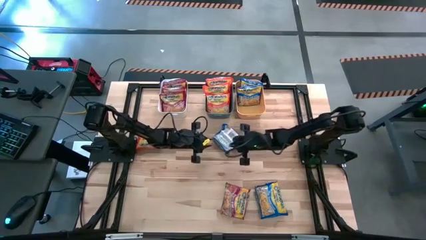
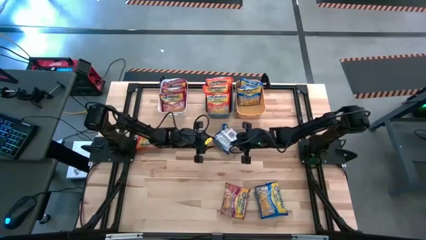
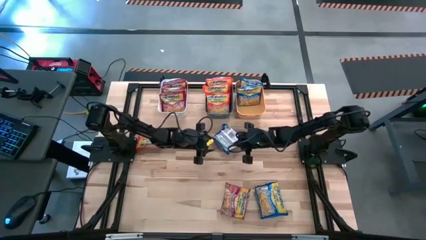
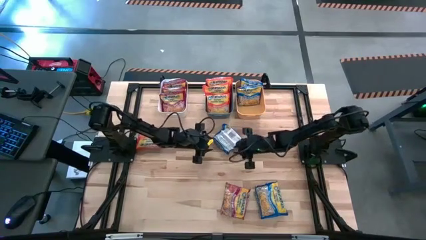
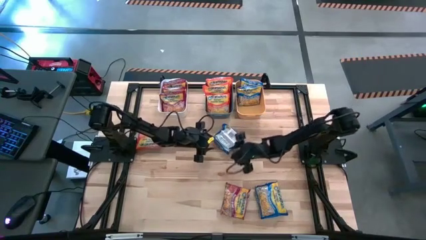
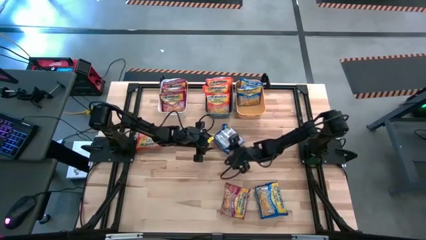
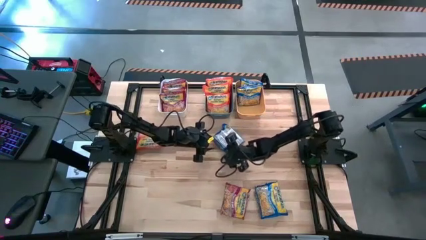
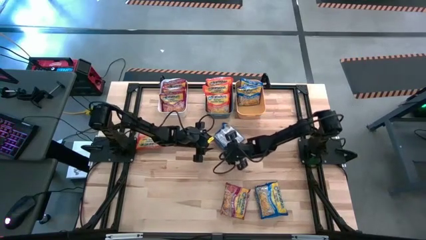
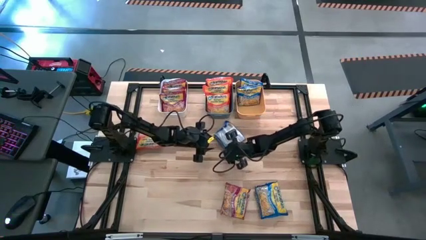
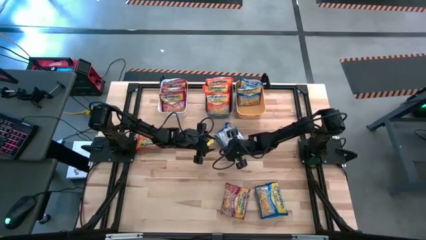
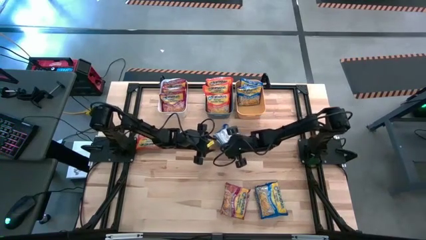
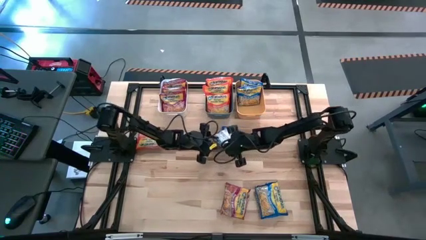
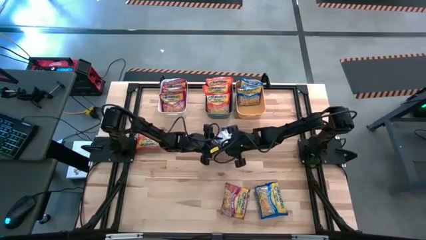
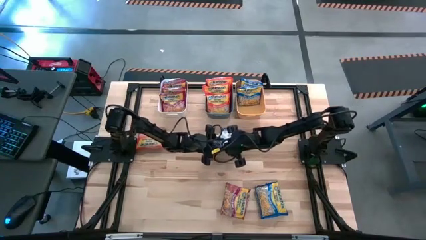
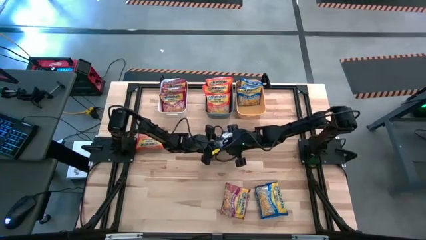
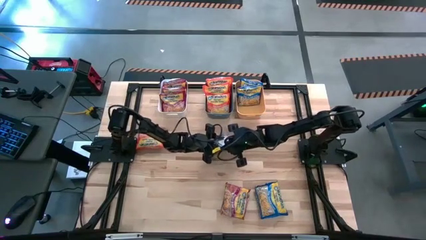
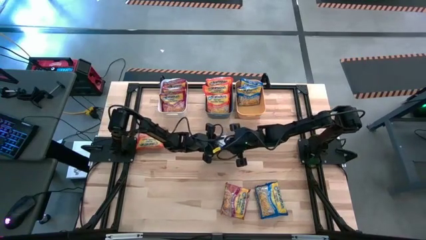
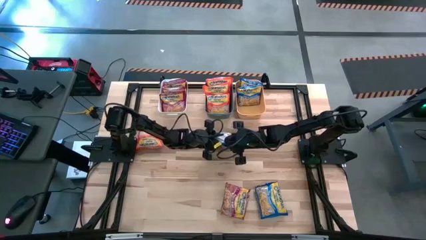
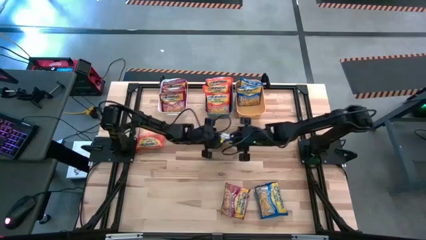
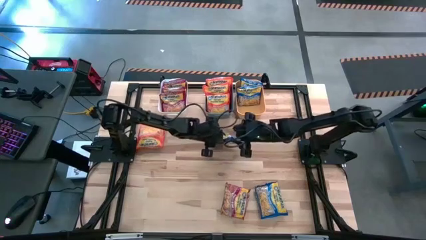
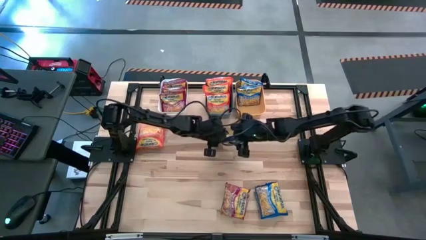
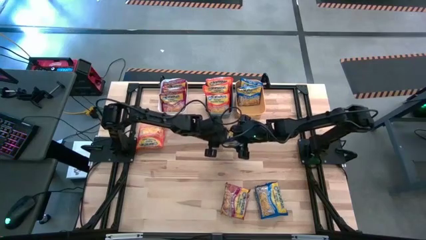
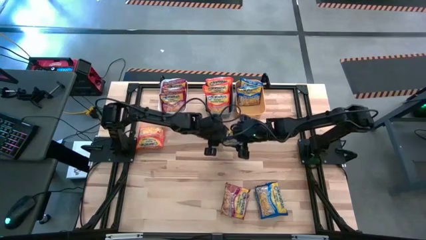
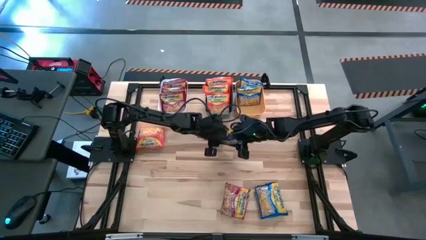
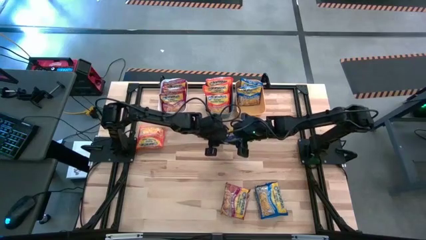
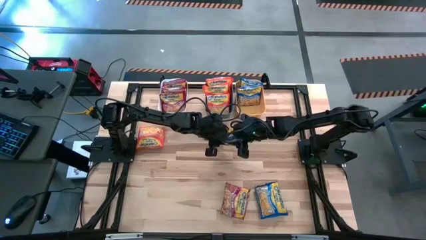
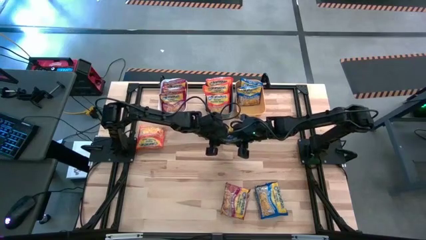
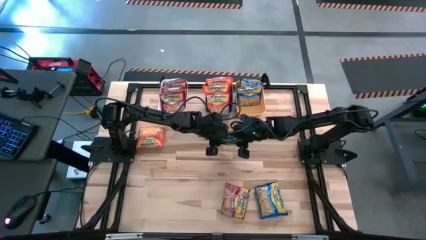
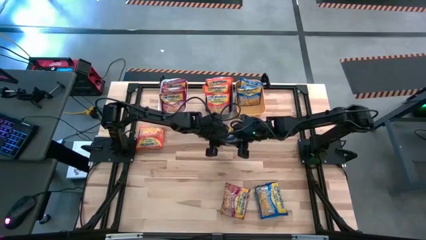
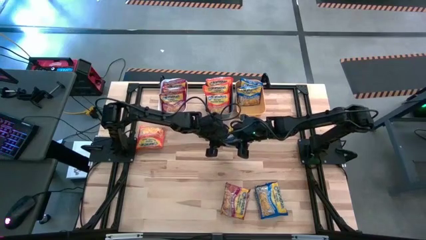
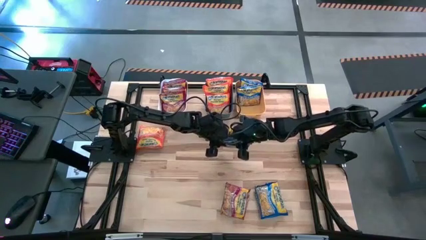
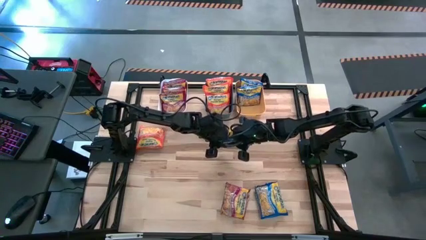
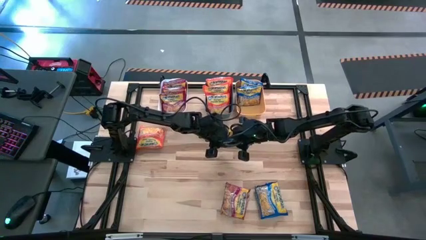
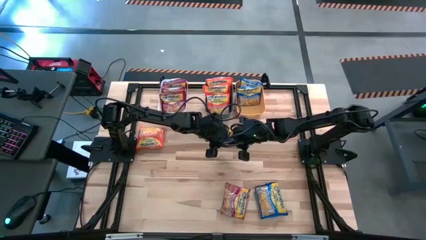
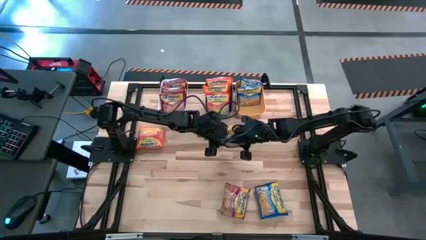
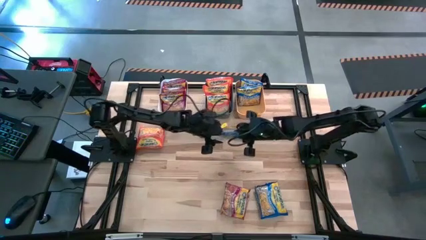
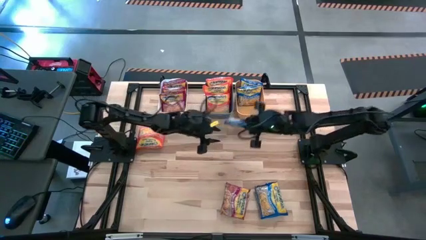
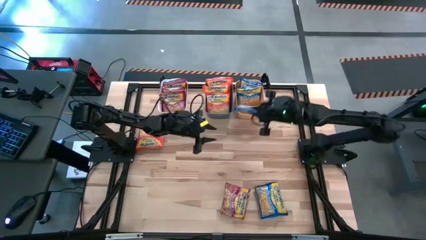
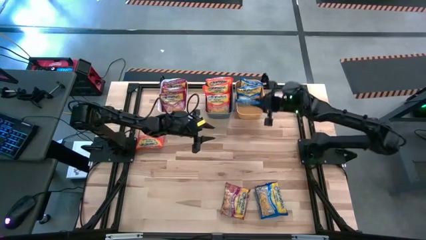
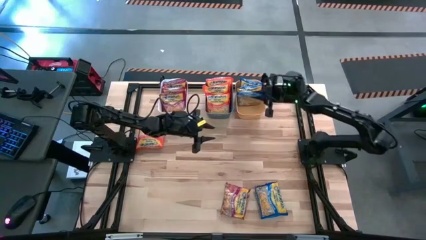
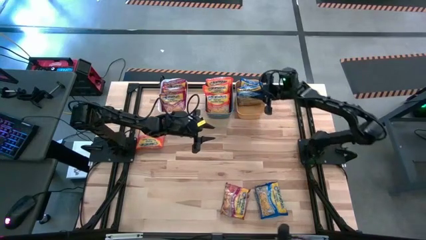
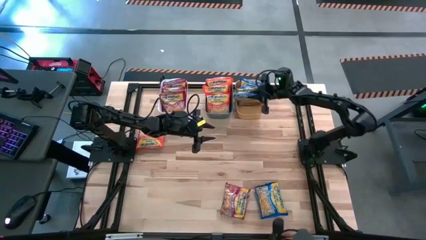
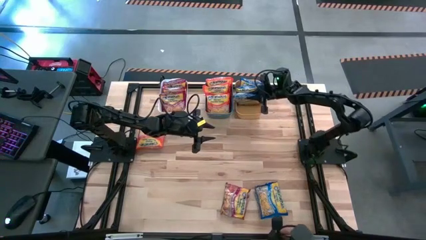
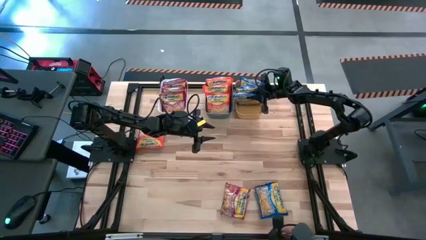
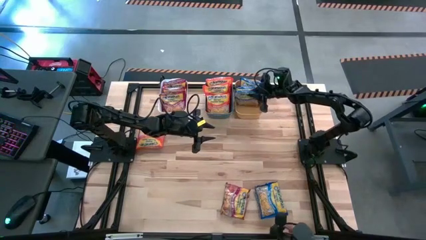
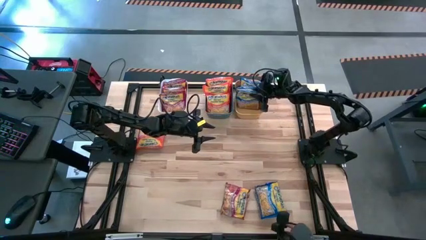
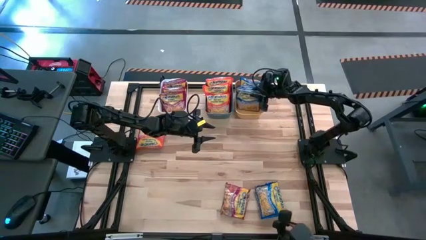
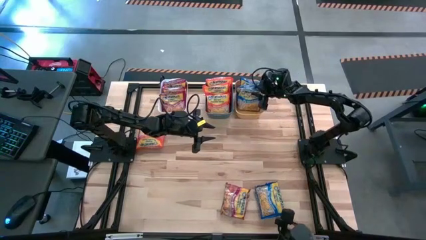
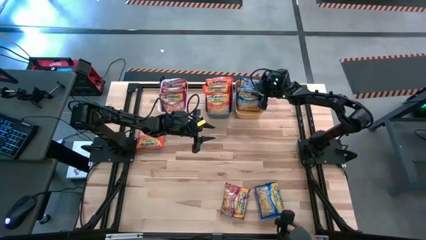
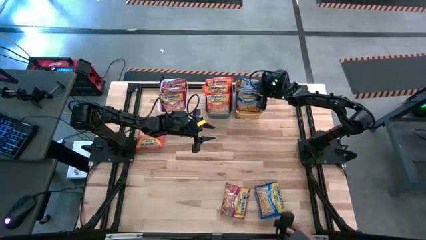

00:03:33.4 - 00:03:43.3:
Task: Sort Maruchan noodles
Put the blue noodle pack into the yellow bin

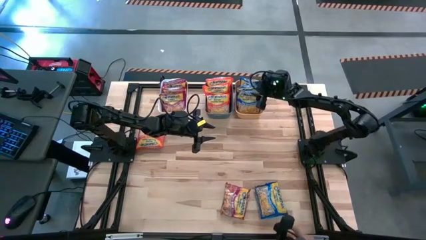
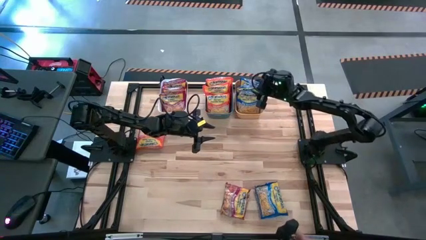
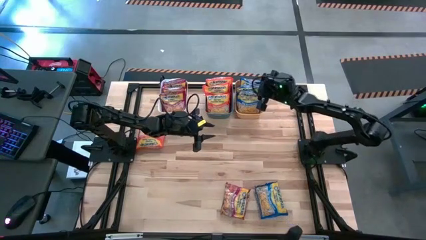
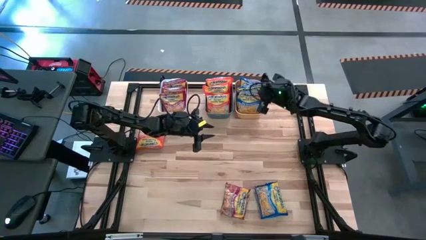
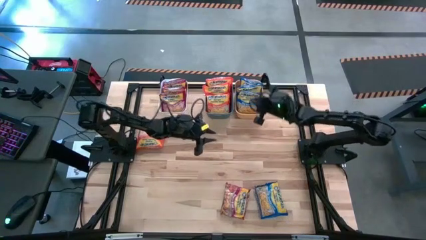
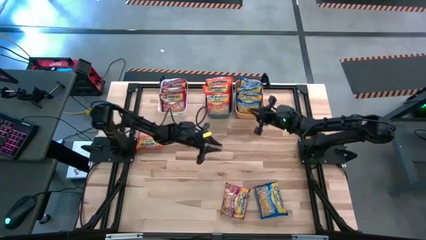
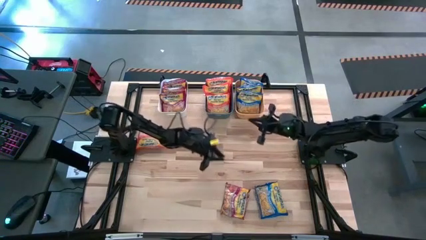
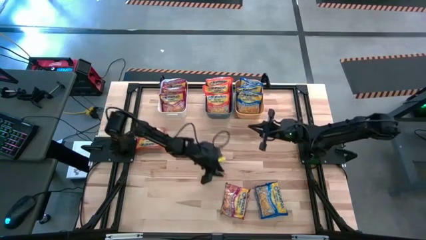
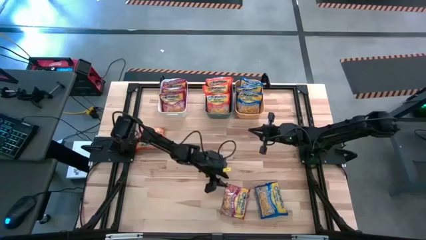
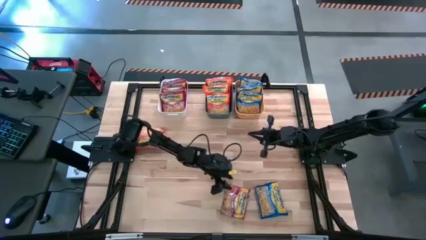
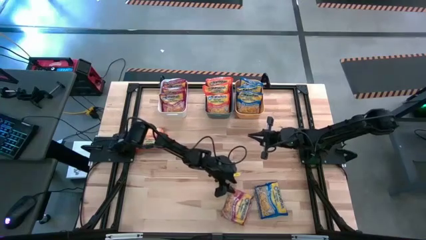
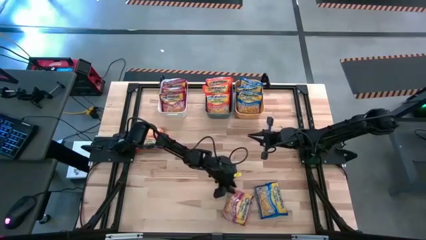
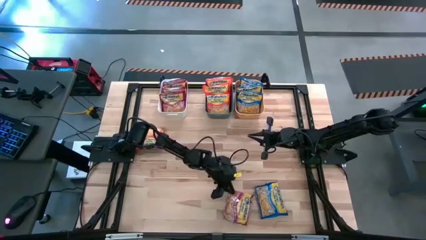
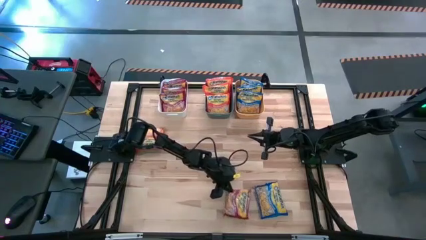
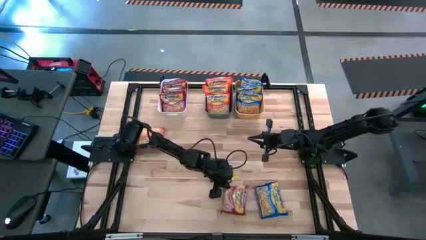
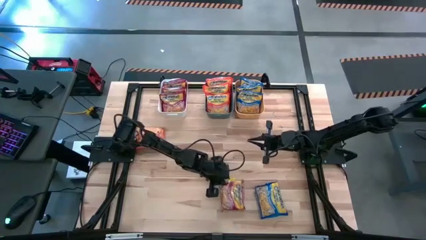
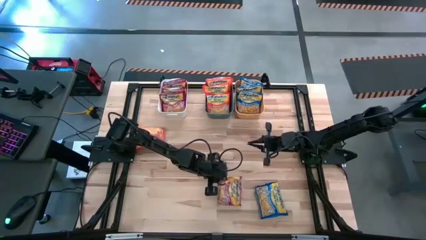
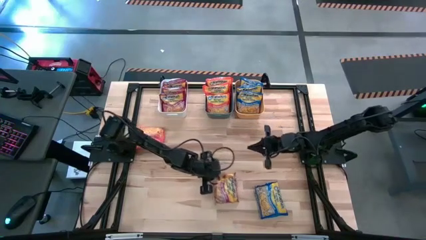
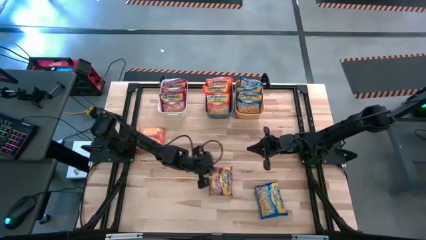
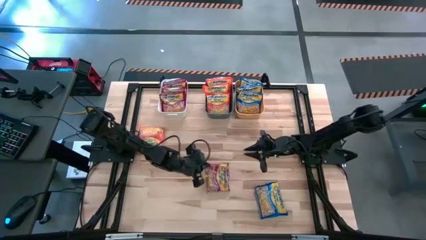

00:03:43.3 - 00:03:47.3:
Put the red noodle pack into the white bin
